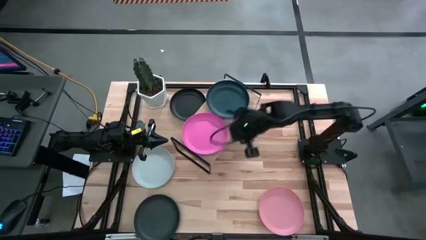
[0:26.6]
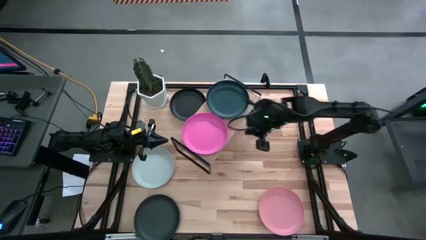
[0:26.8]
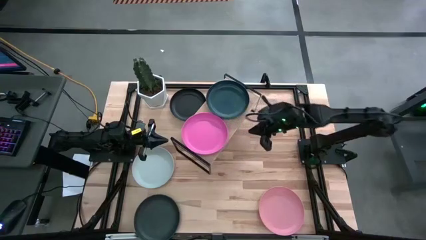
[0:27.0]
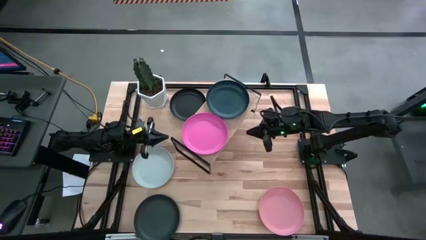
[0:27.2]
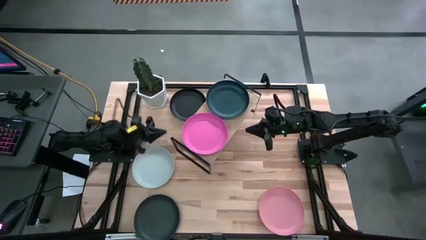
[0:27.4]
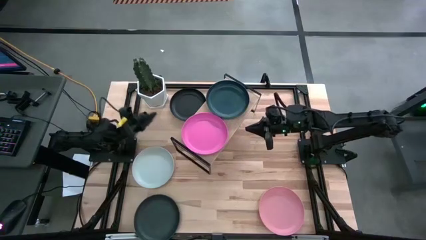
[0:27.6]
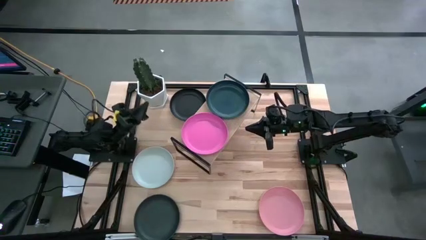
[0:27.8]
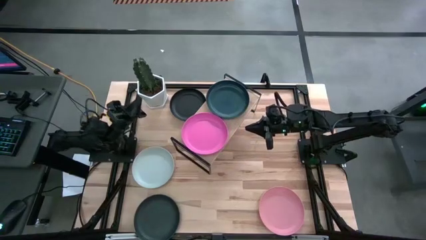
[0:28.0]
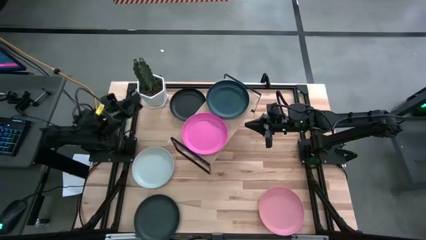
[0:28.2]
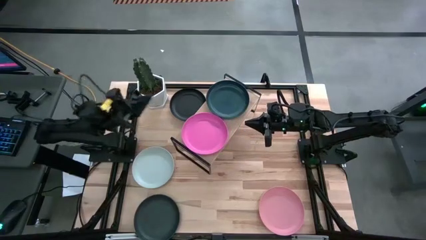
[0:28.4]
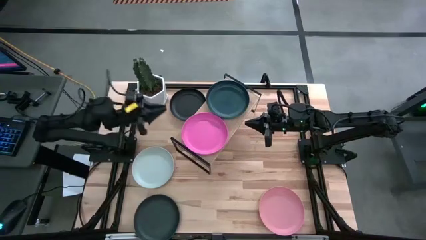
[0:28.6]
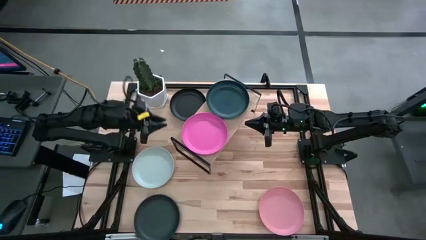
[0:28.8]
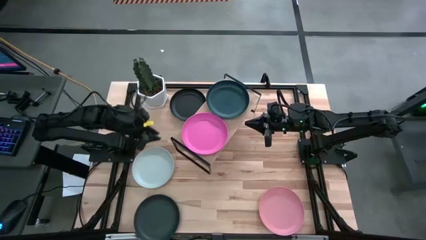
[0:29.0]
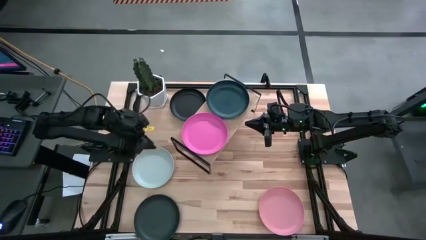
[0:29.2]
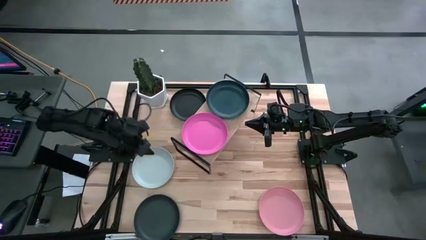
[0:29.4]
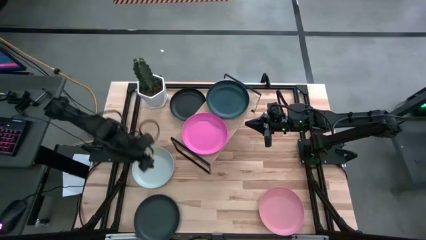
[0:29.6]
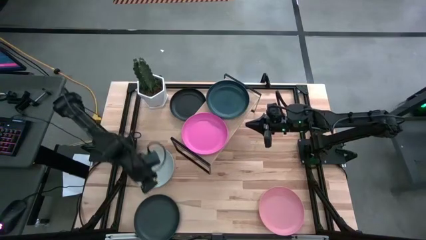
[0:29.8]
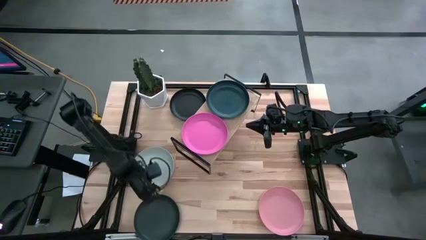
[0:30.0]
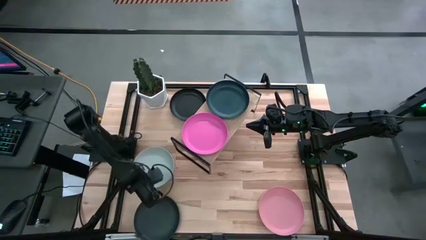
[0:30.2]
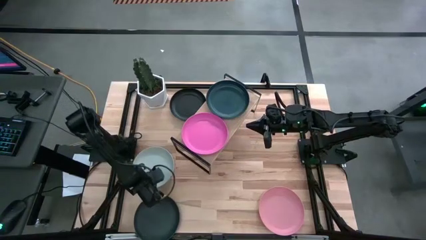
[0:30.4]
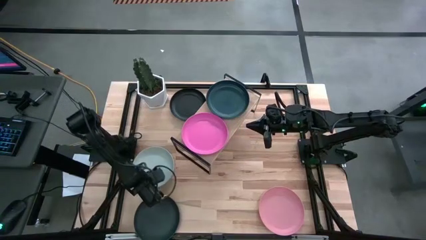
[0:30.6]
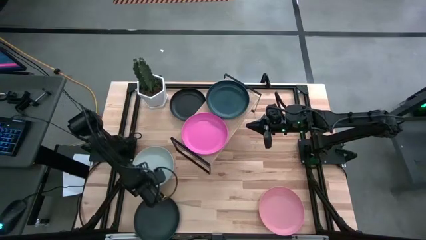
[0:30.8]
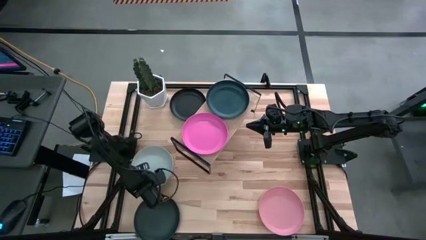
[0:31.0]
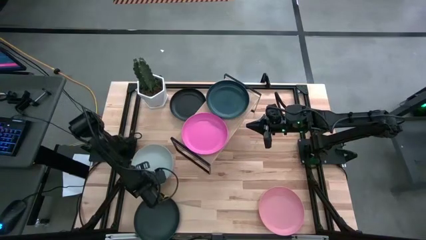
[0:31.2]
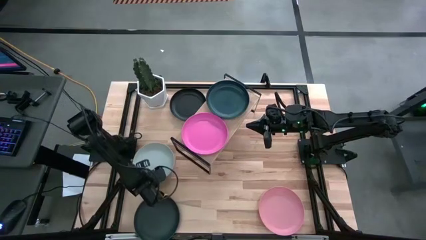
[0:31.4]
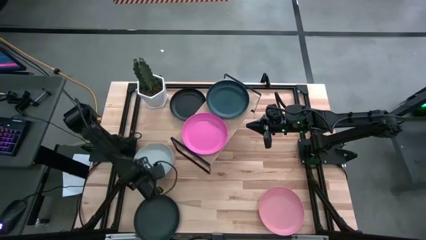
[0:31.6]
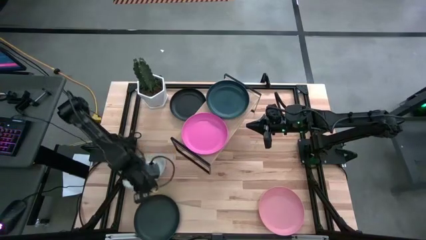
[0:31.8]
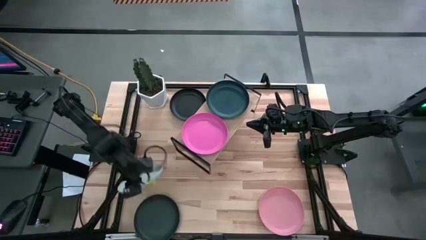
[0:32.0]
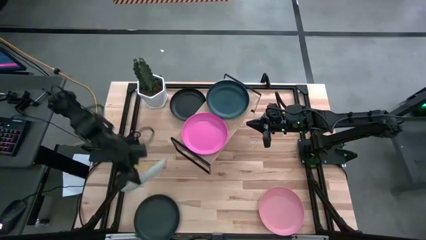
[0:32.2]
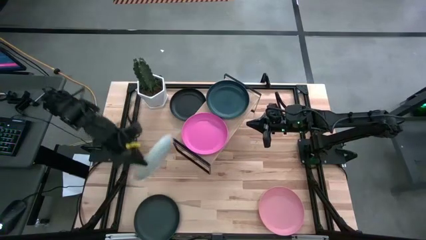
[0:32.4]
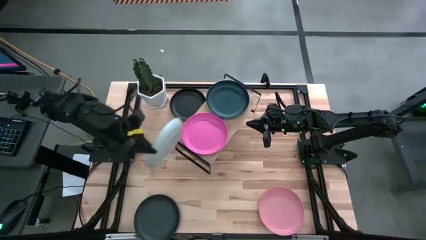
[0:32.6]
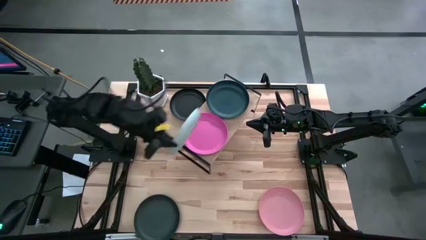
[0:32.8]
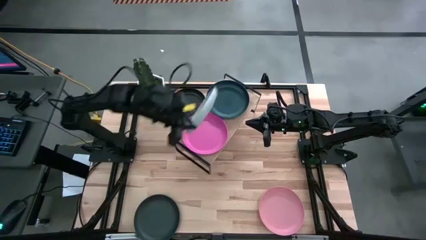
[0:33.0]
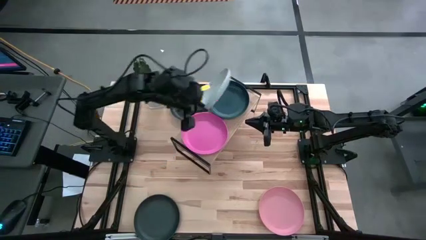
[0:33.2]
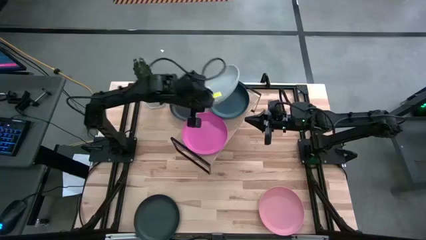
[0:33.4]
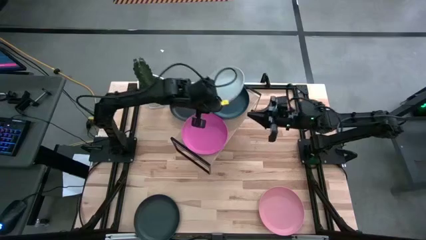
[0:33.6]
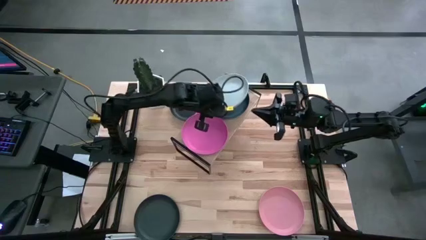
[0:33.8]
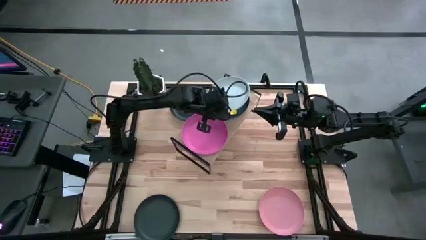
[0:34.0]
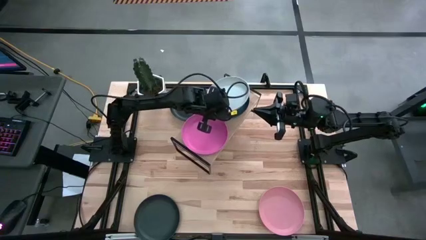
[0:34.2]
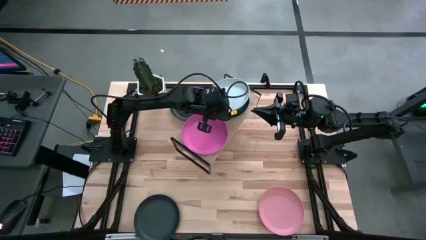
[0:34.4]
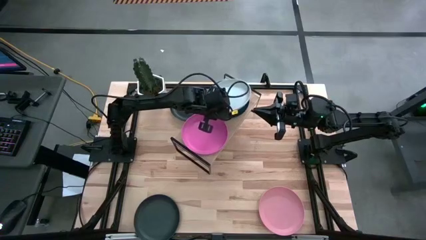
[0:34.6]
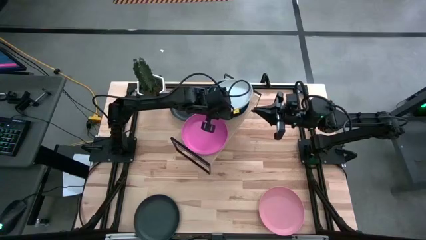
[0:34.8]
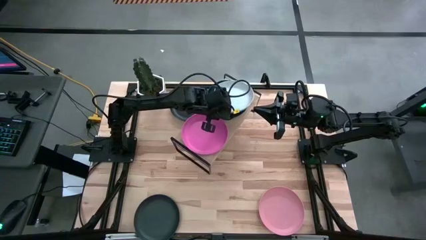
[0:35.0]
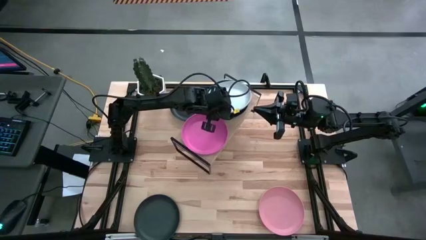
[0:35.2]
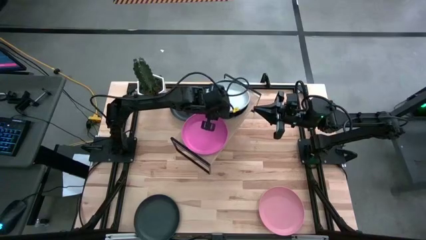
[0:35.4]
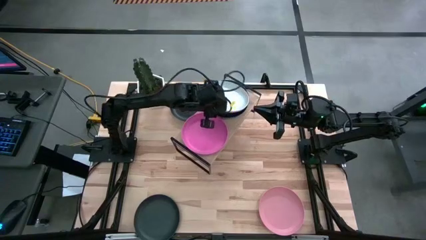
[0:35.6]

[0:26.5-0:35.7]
Task: Place and stack plates onto a shelf
Stack the white plate on top of the dark green plate on the shelf

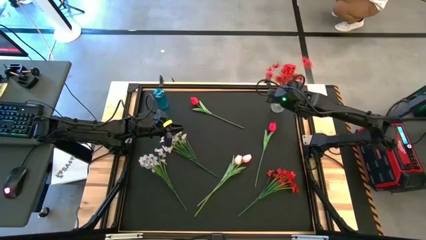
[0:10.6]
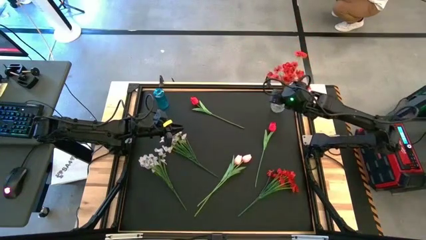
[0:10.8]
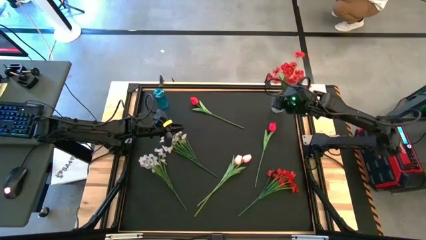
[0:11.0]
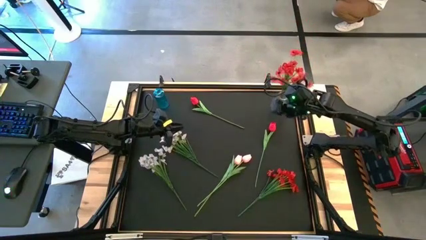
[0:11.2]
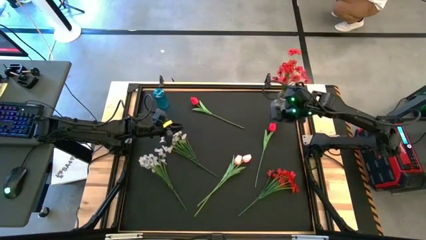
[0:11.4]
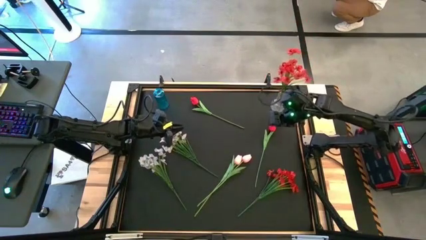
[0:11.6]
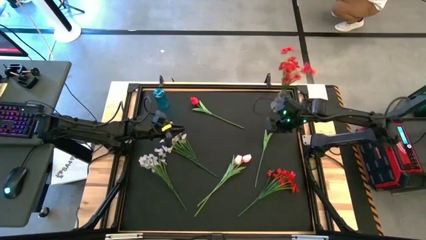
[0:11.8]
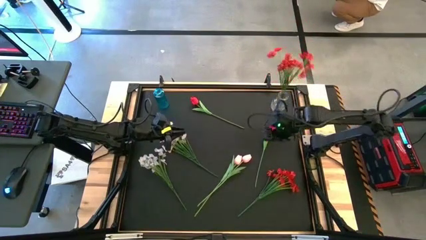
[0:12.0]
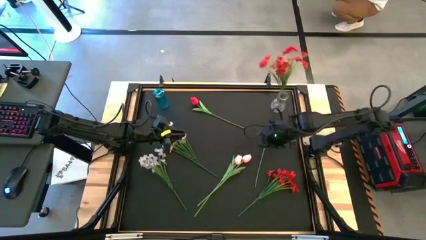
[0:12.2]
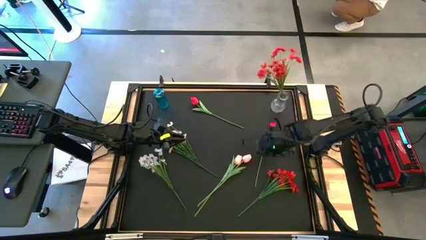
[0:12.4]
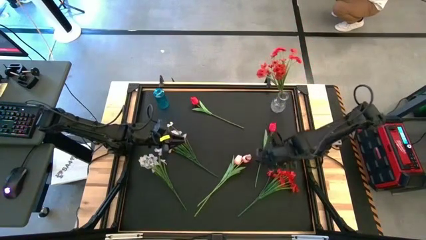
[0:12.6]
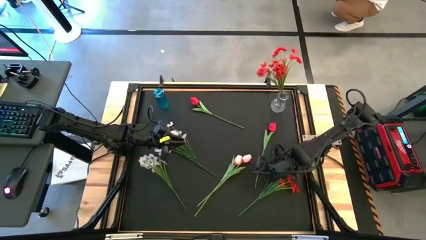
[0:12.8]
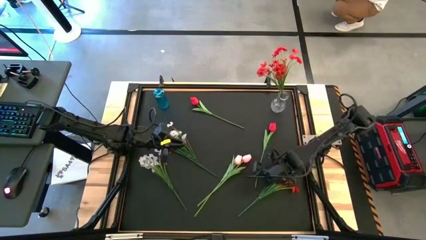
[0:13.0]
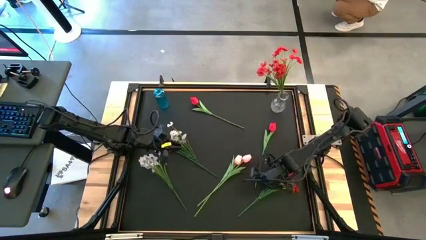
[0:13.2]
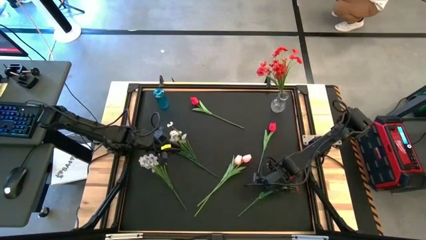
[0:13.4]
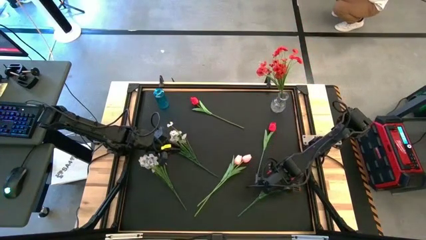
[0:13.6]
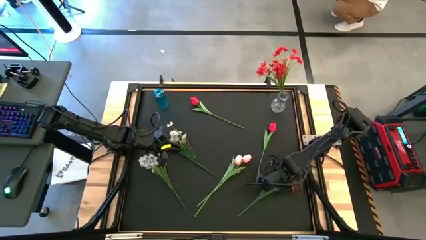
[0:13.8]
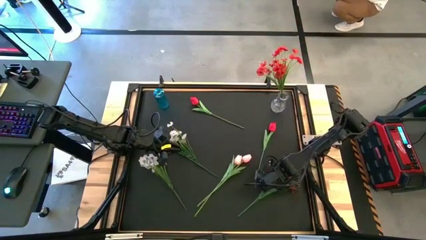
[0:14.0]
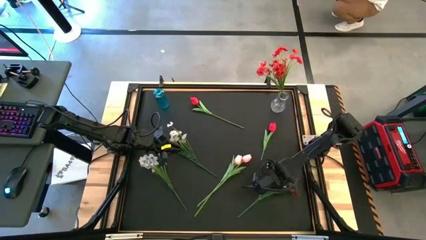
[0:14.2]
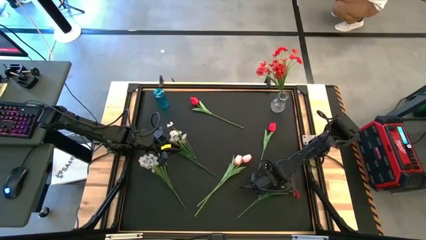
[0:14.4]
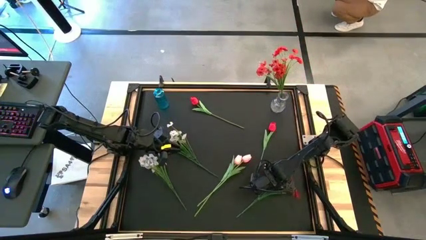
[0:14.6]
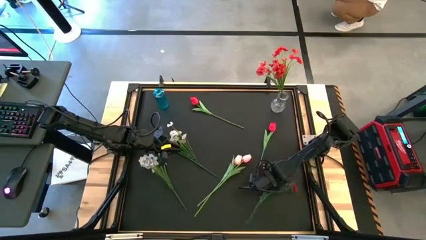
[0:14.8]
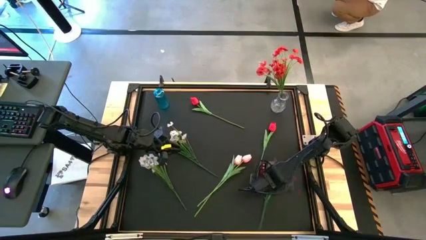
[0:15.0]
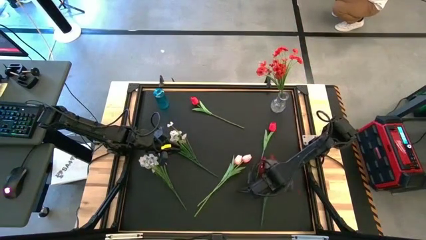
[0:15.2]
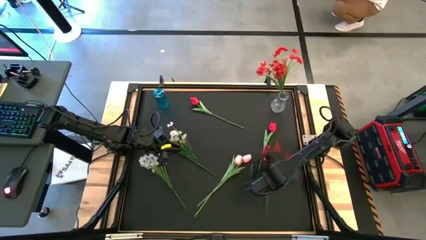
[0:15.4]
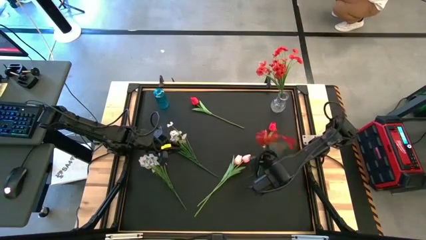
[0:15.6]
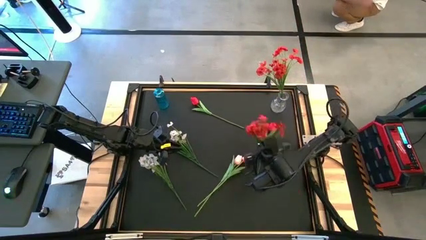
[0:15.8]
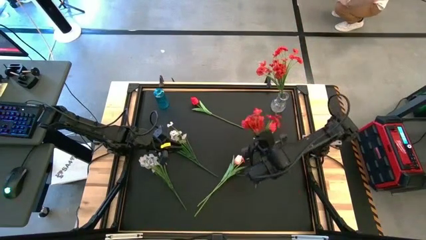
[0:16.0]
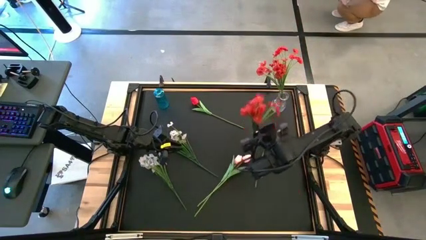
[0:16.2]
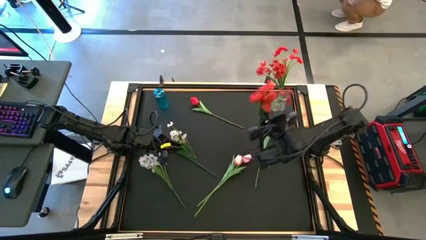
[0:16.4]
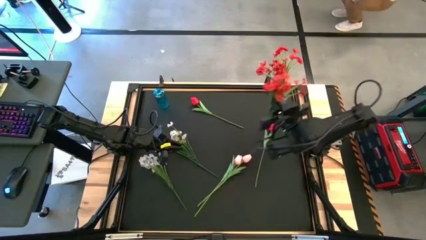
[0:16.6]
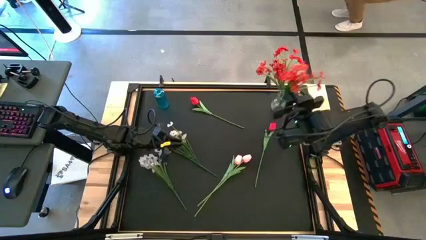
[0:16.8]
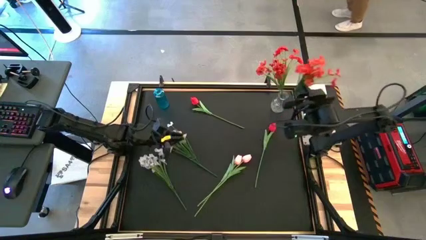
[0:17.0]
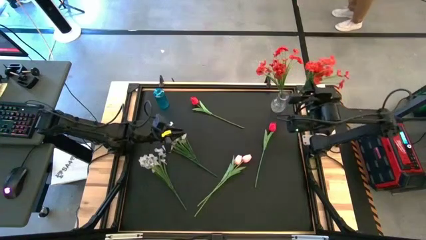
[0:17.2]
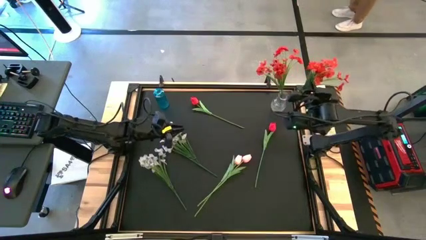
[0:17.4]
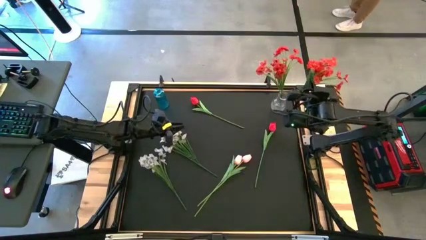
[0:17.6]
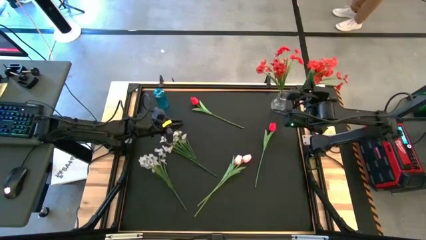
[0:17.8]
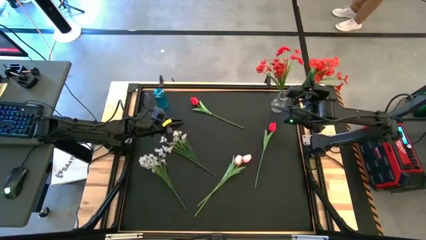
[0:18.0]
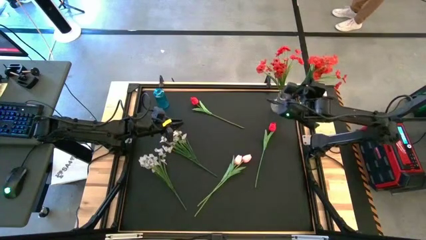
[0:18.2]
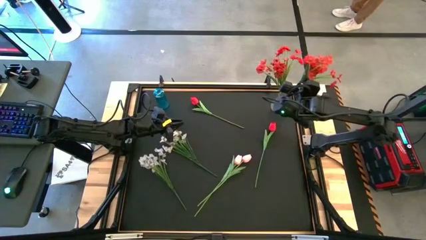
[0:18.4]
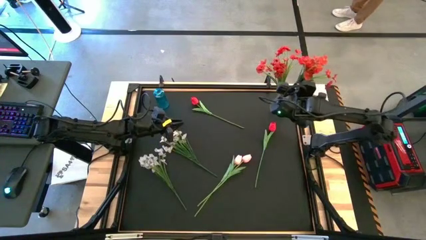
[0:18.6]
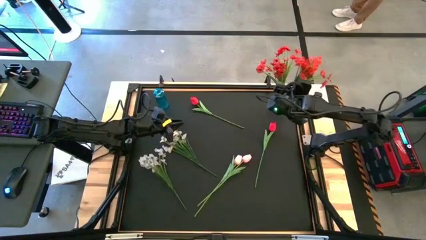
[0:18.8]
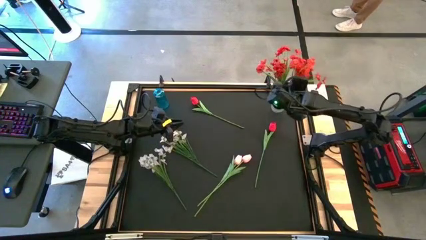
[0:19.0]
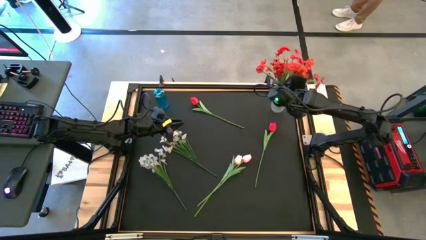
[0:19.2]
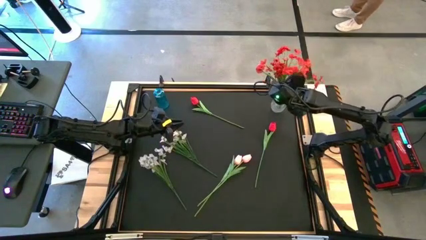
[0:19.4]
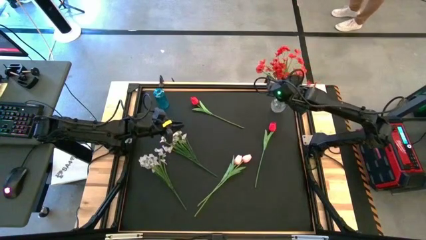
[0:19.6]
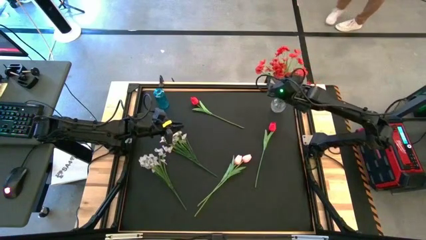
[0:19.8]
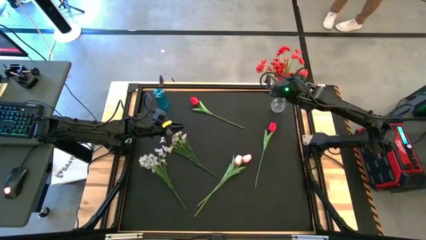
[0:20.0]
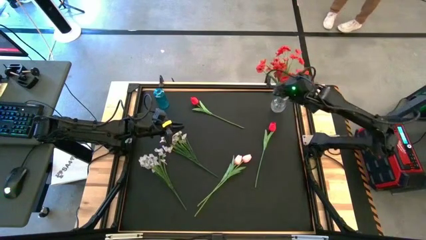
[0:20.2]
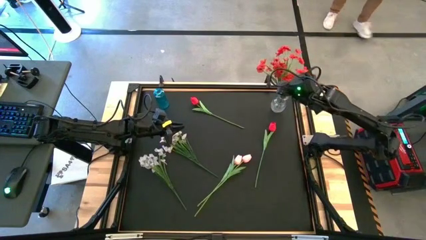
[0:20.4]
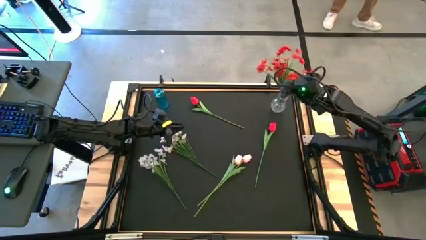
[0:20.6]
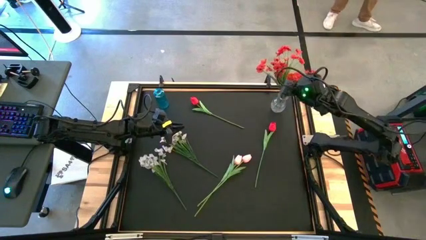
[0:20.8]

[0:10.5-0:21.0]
Task: Sort flowers into vase by color
Put the red flowers into the transparent vase
